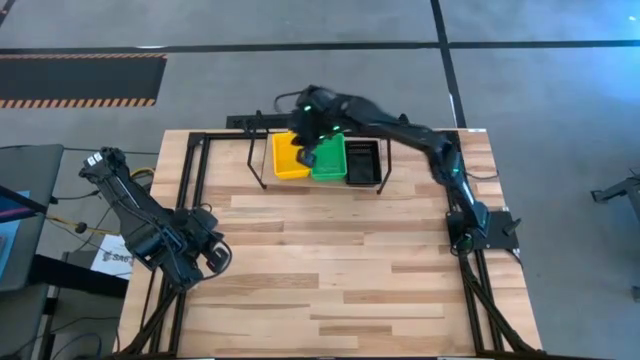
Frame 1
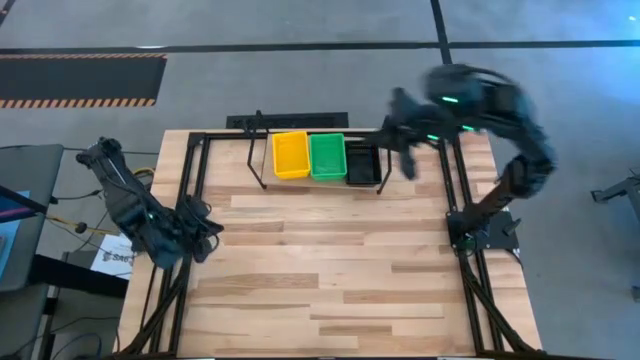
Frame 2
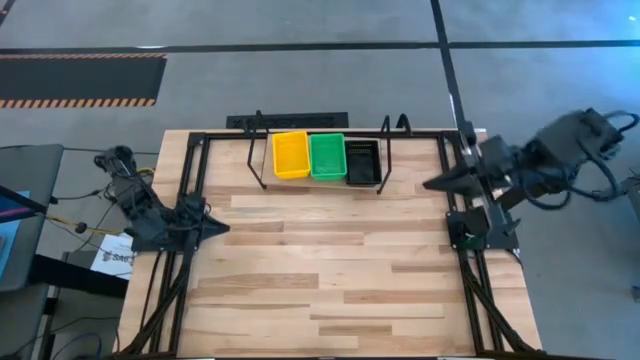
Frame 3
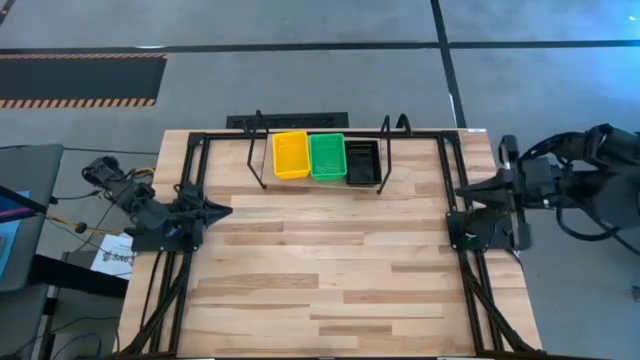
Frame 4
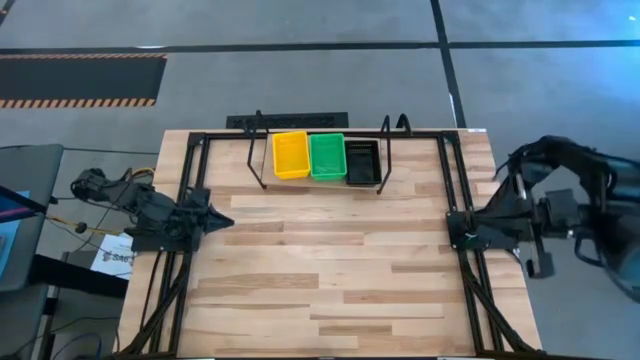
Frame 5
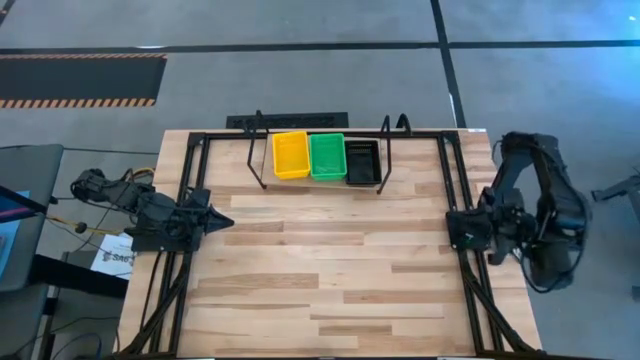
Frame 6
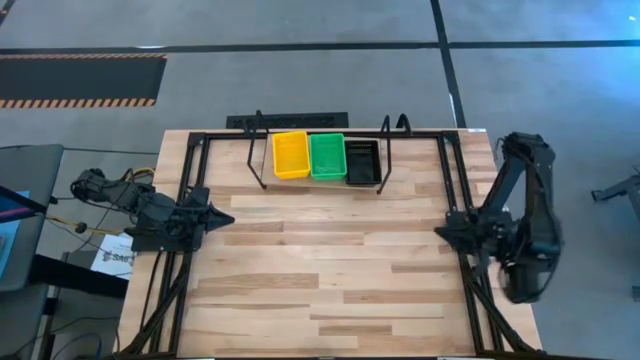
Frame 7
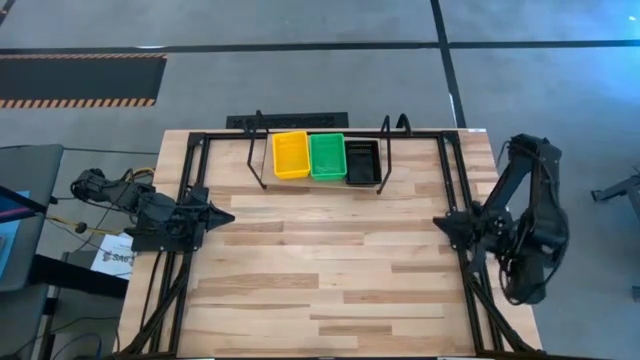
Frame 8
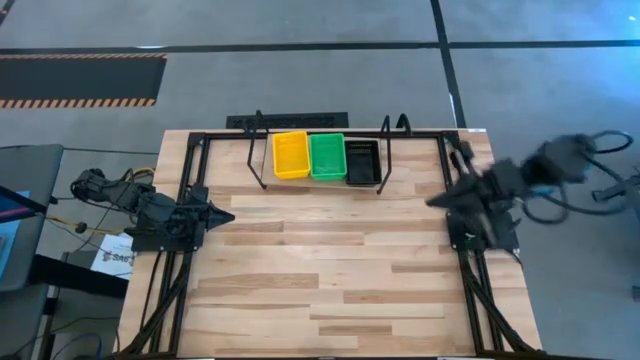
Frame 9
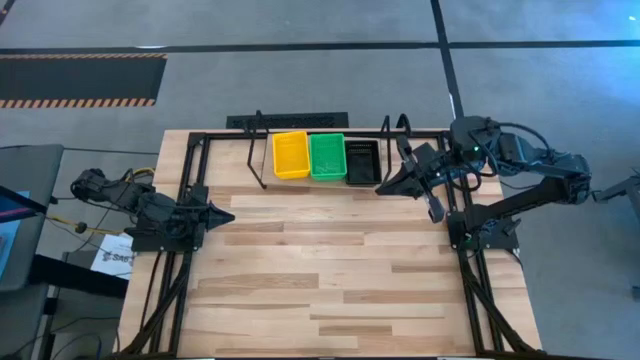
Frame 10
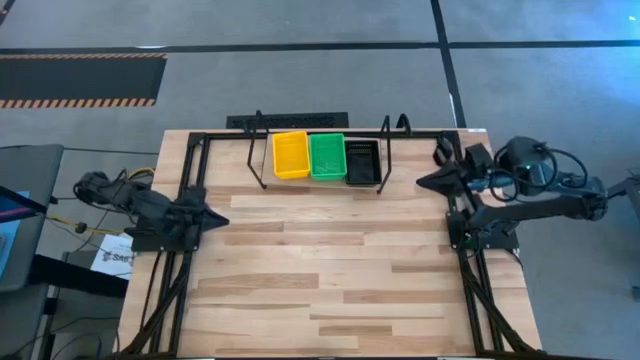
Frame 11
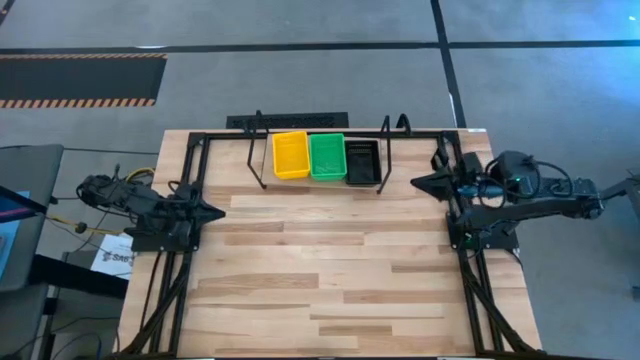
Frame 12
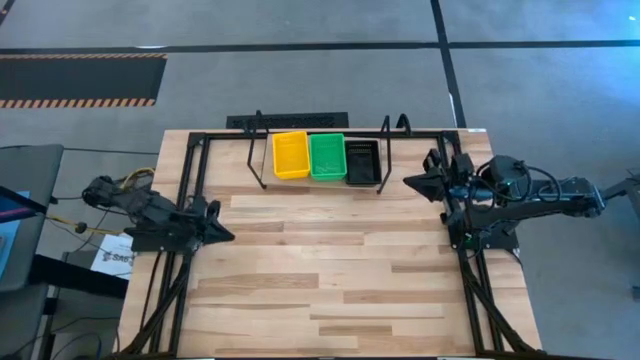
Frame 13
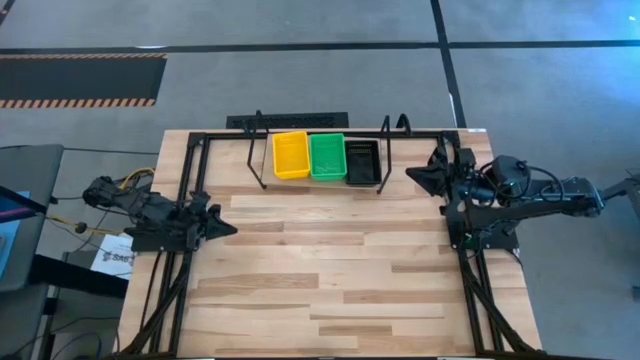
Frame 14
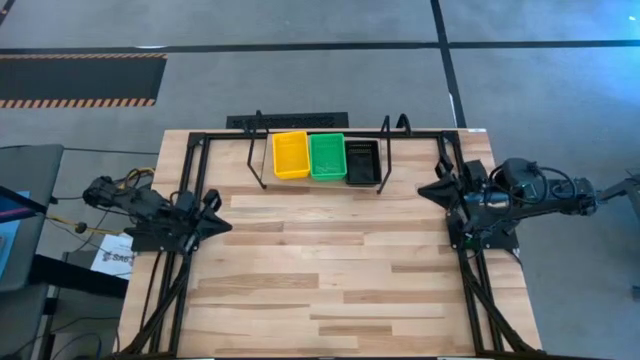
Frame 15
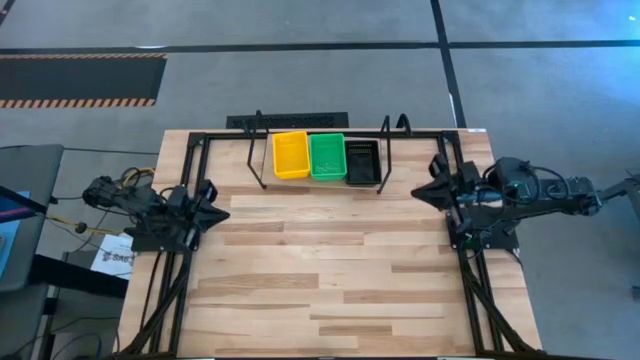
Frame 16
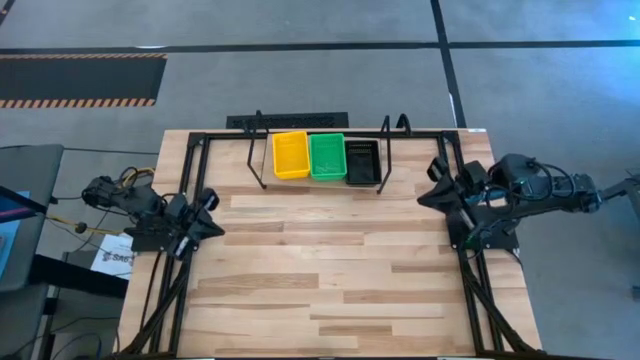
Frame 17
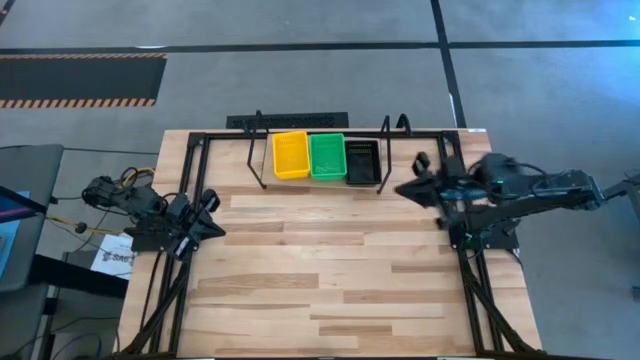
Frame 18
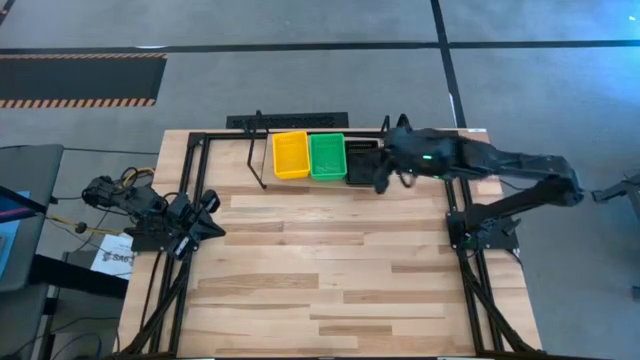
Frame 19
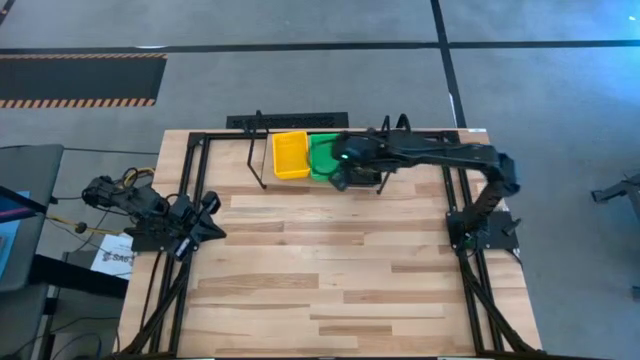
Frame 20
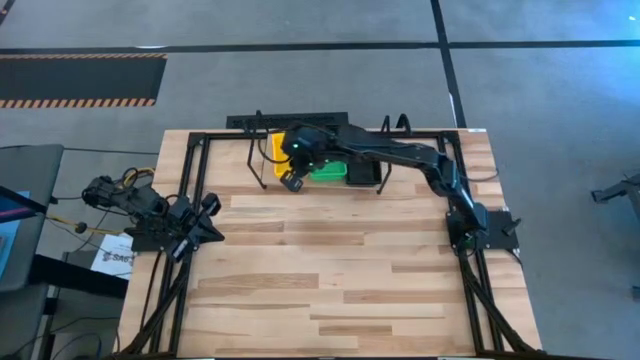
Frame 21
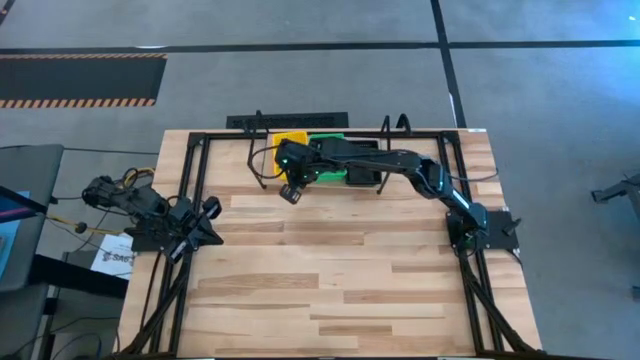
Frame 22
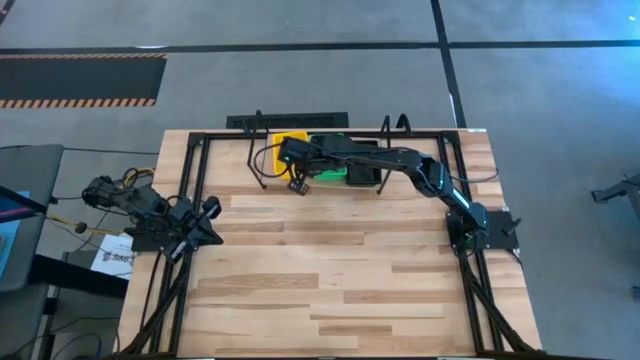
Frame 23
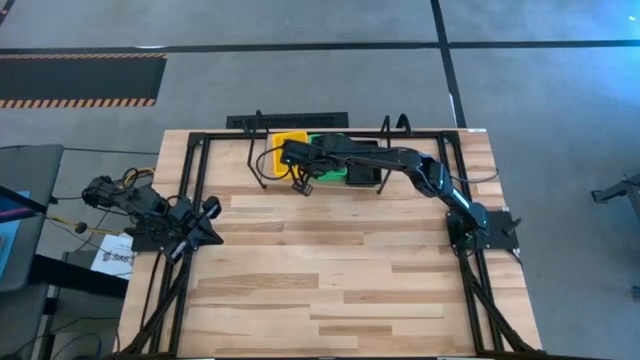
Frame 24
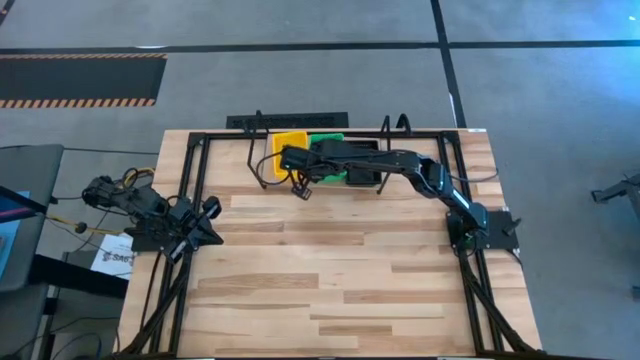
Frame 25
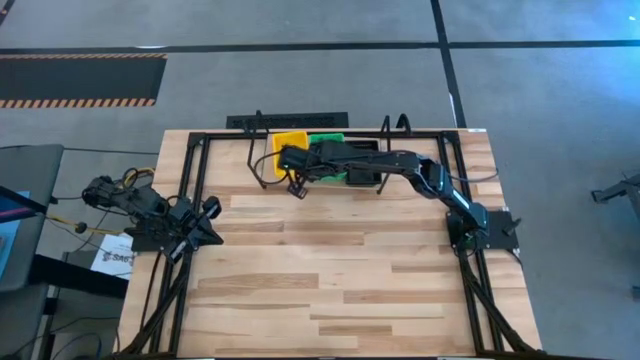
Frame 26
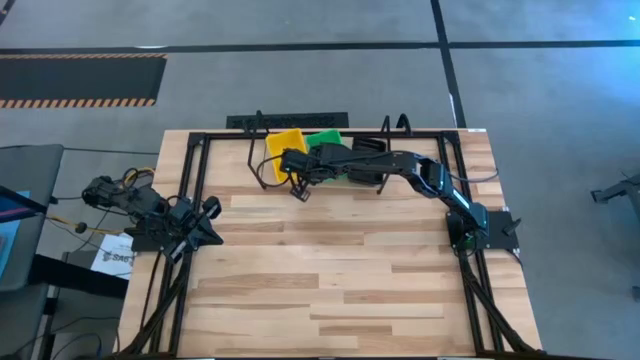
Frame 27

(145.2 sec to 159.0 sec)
Task: Stack baskets on shelf by color
Adjust the yellow basket on the shelf

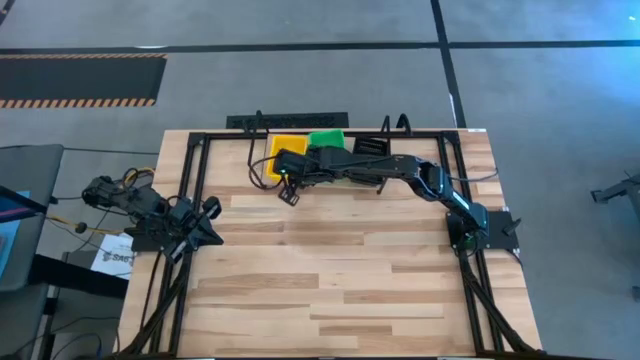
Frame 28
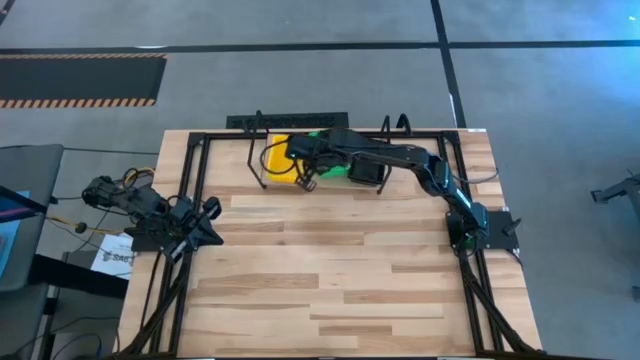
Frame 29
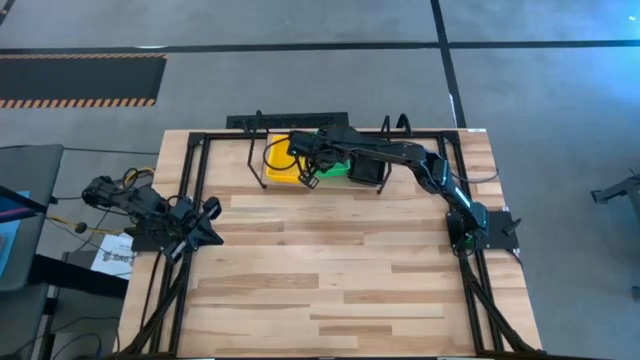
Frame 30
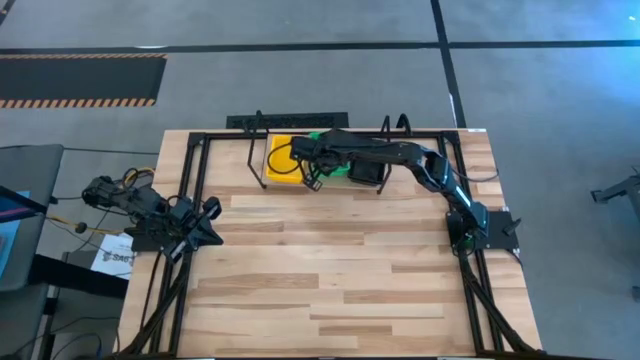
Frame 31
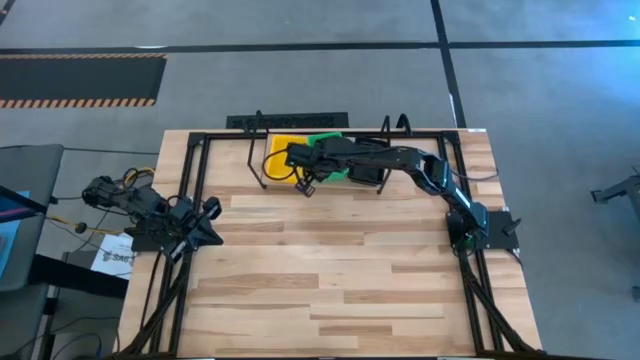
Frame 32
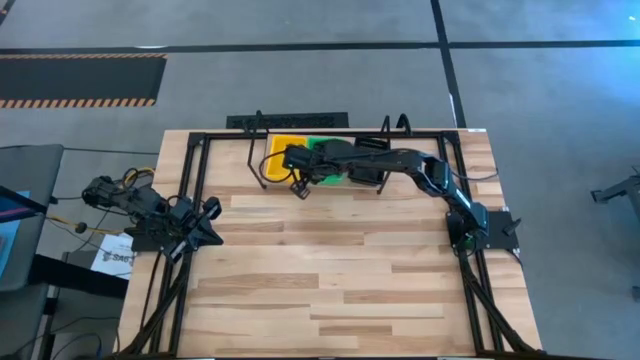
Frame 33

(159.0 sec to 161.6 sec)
Adjust the green basket on the shelf

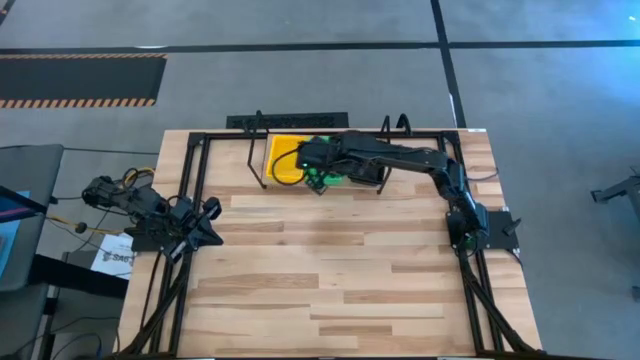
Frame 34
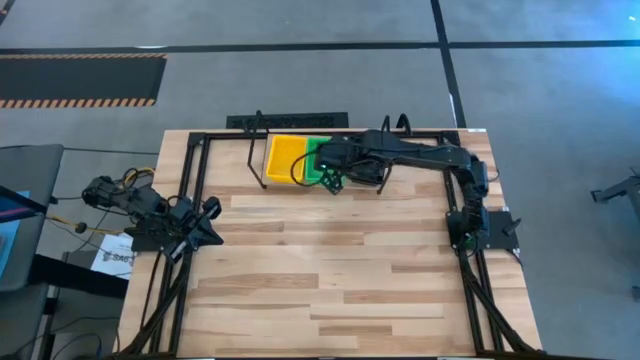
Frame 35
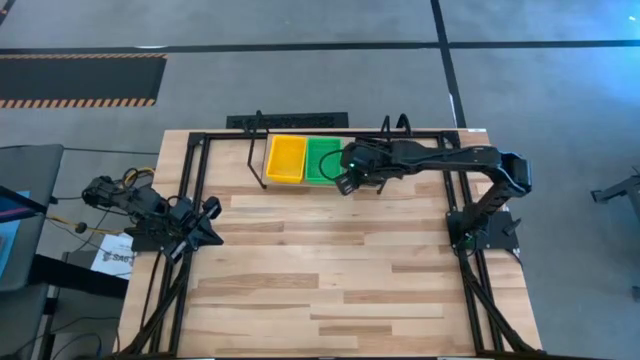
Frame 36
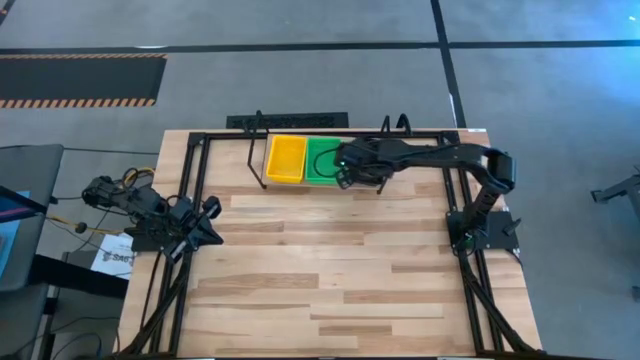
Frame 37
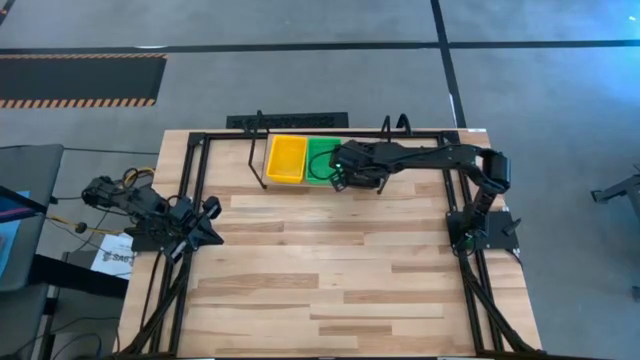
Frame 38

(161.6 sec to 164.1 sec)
Adjust the black basket on the shelf

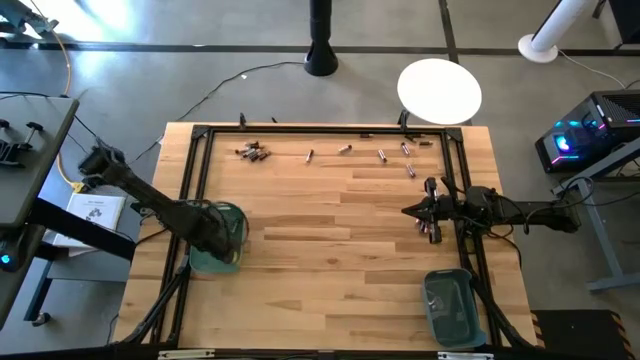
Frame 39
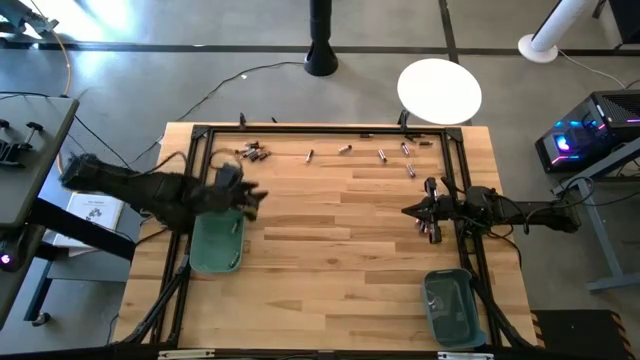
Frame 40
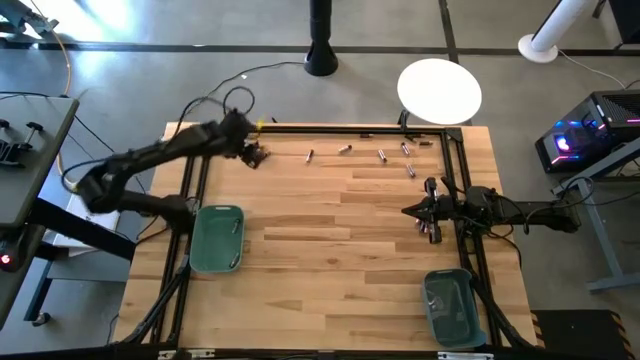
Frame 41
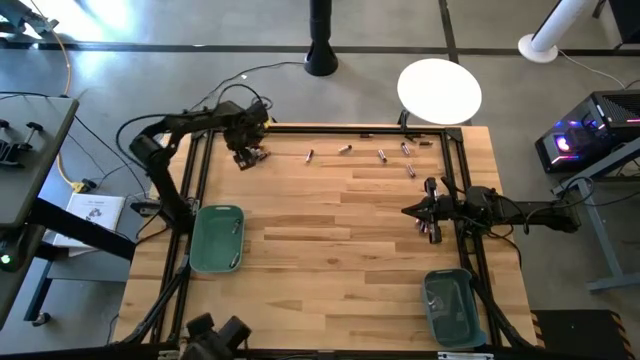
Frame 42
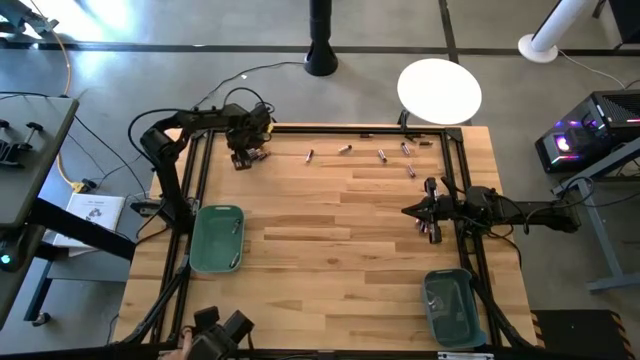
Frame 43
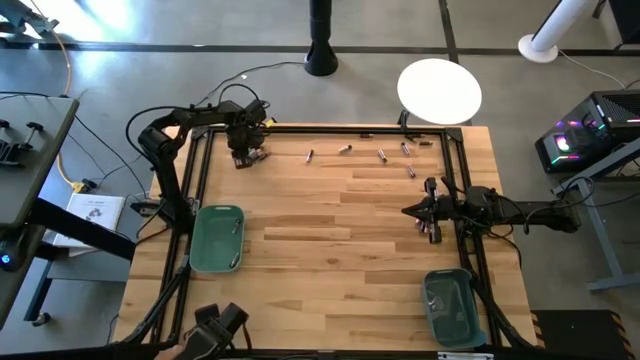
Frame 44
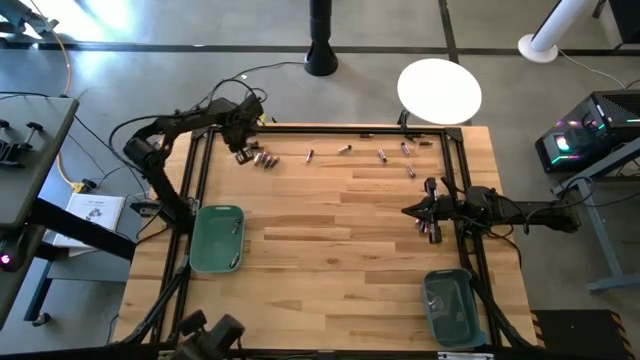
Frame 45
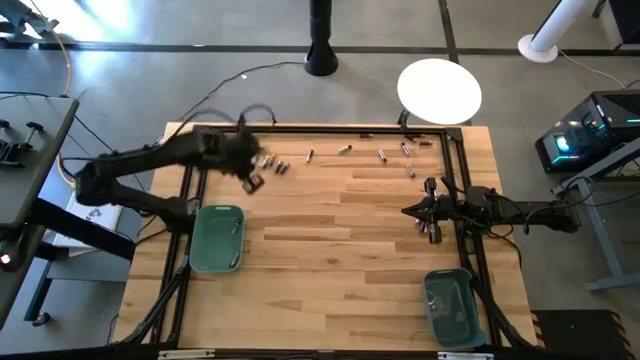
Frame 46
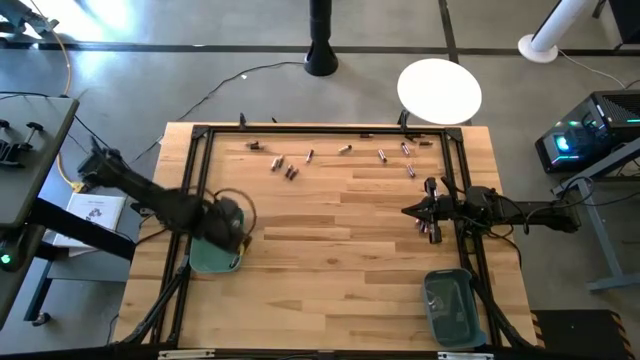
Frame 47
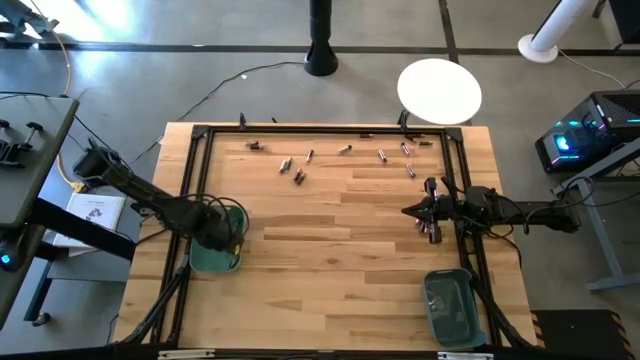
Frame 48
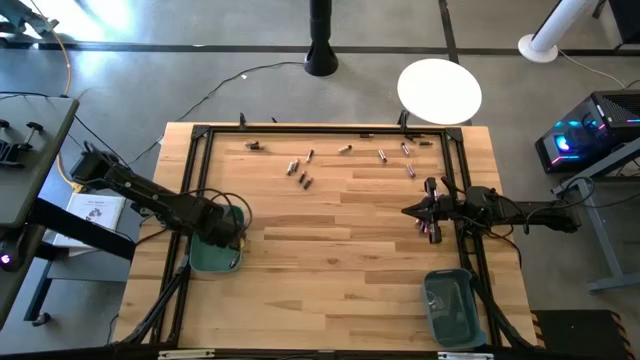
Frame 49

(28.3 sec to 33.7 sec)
Task: Sort batteries
Put the silver battery into the green bin
